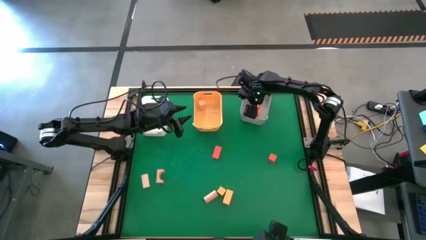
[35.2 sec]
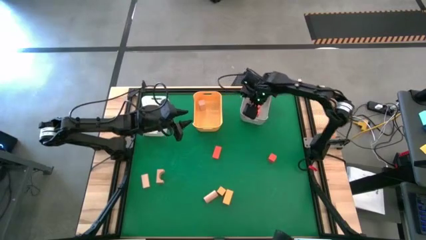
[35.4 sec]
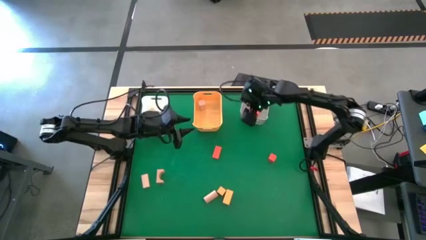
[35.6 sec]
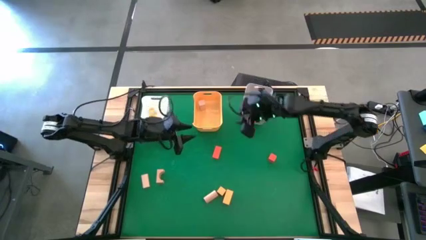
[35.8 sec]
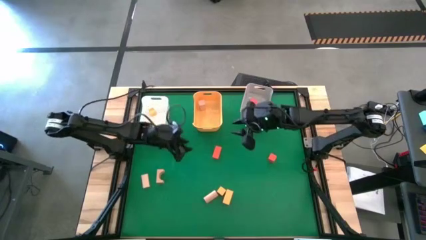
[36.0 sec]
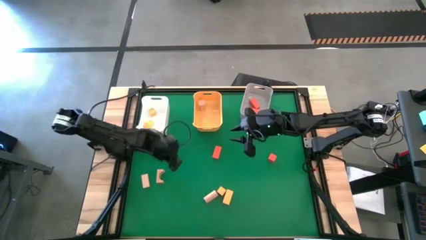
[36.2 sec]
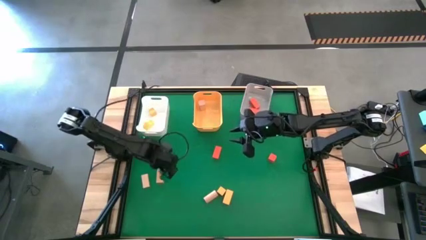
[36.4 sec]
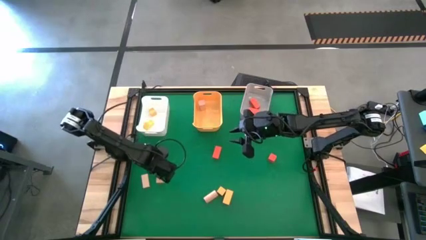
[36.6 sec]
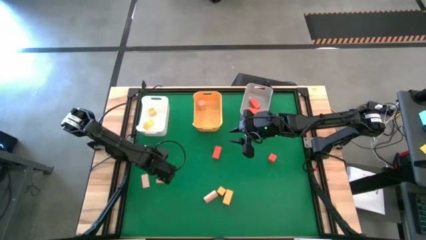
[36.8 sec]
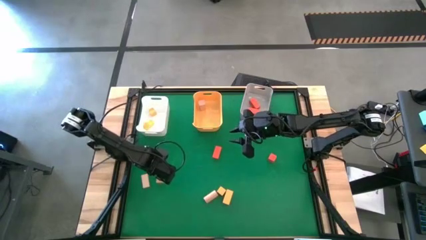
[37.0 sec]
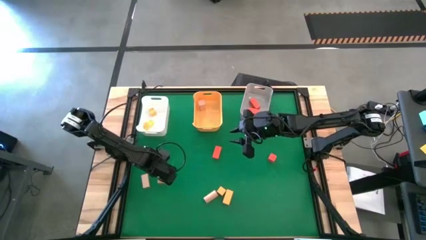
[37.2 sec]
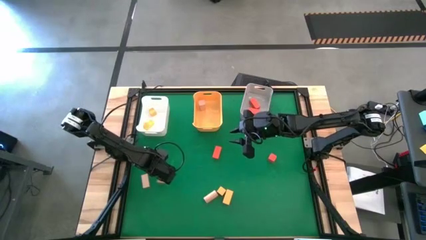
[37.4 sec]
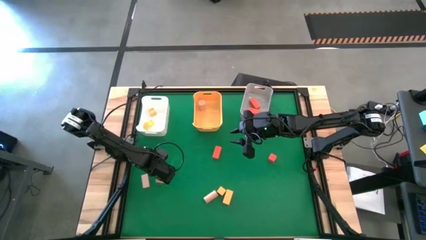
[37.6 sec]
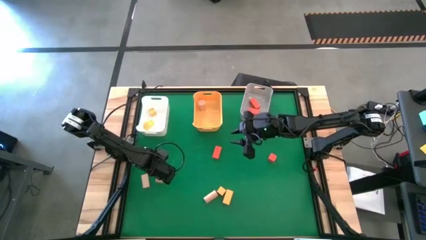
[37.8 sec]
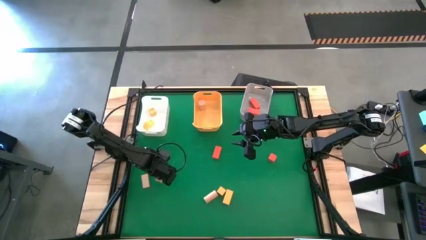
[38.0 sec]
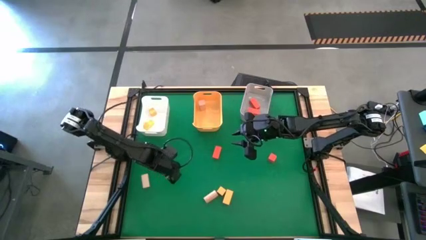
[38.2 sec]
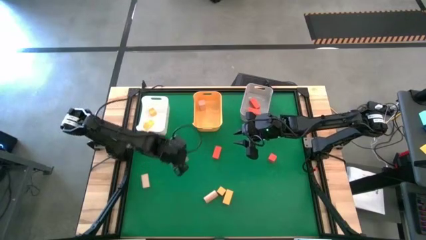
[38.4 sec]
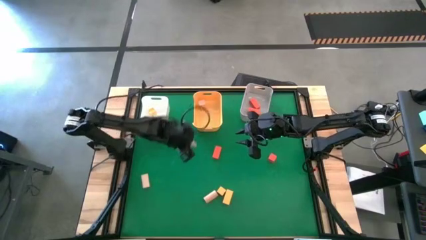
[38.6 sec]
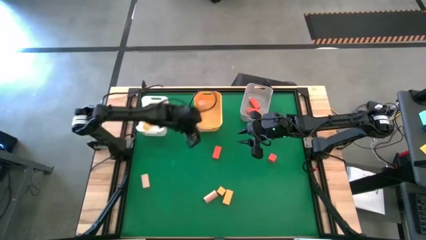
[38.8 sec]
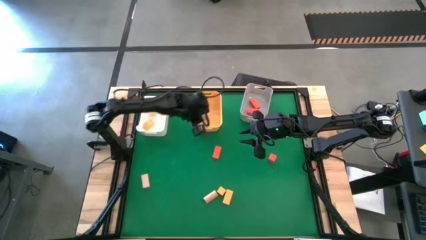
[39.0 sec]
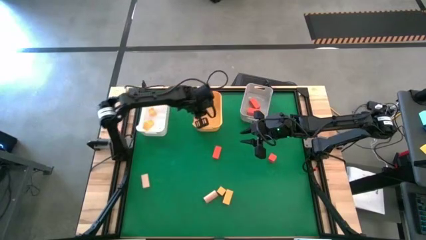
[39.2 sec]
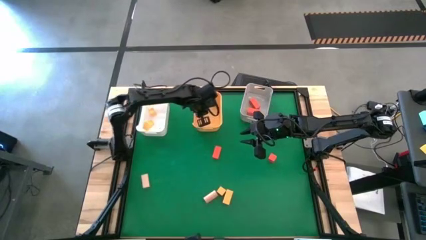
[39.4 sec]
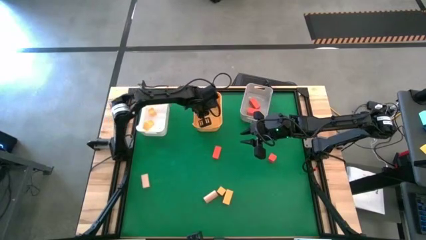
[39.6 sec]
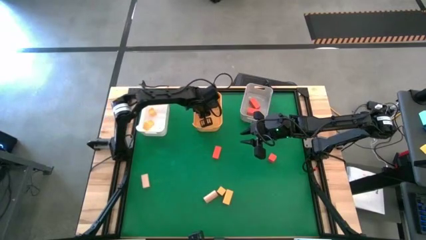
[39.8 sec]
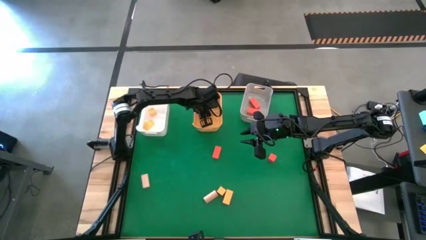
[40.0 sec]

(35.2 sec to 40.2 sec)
Task: Sort & place blocks by color
Put the brown block into the yellow bin

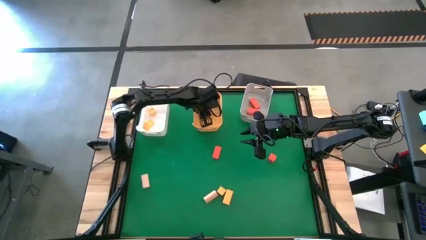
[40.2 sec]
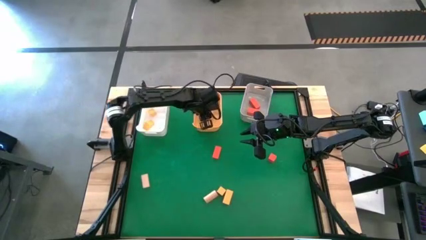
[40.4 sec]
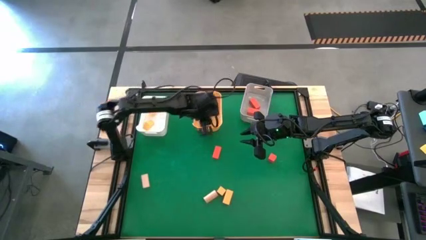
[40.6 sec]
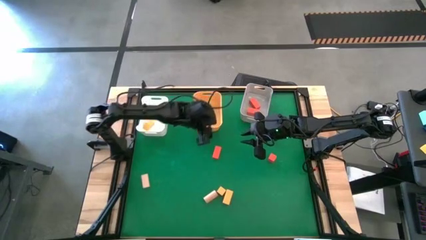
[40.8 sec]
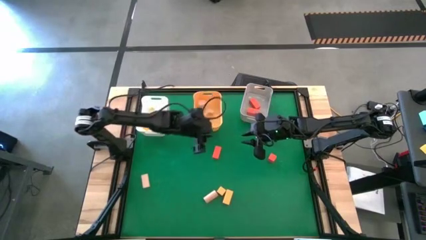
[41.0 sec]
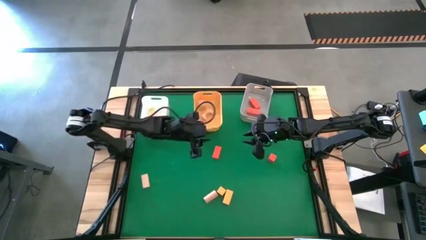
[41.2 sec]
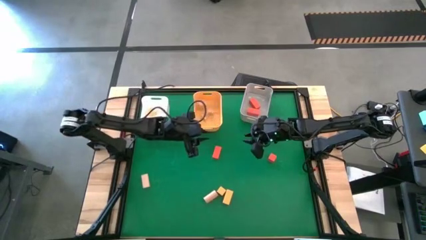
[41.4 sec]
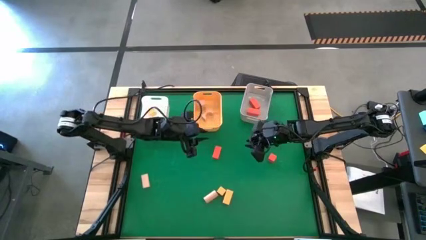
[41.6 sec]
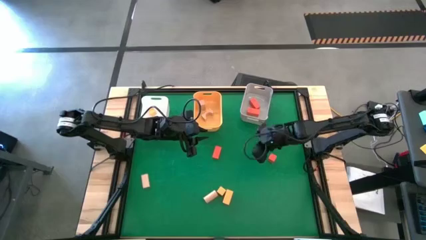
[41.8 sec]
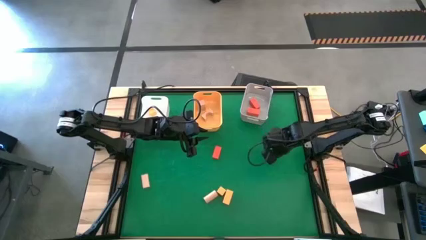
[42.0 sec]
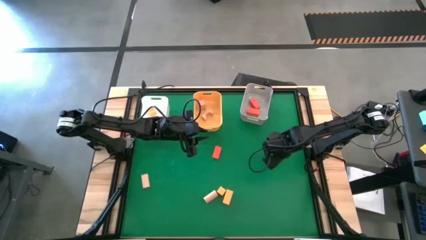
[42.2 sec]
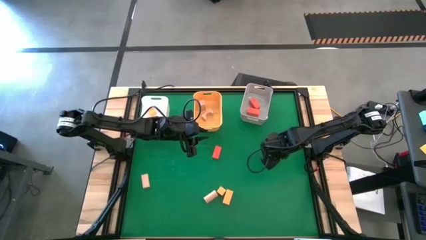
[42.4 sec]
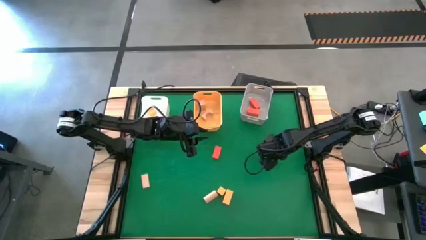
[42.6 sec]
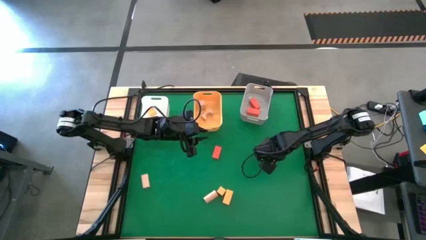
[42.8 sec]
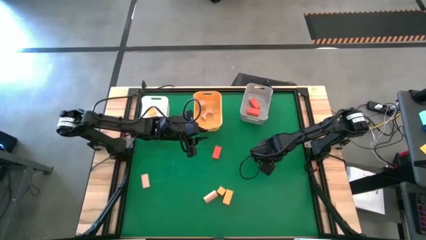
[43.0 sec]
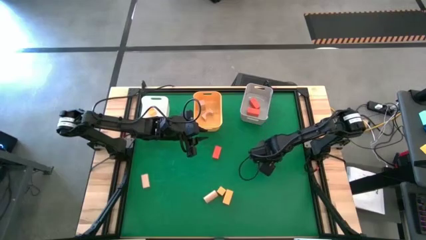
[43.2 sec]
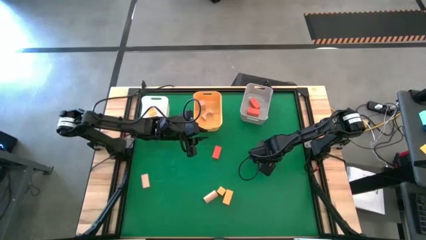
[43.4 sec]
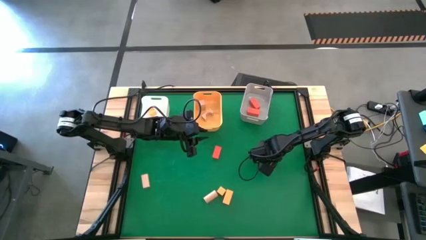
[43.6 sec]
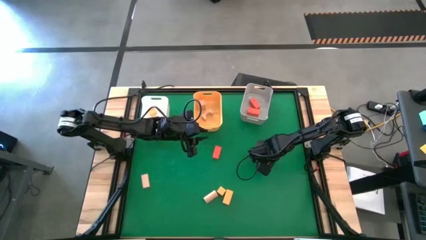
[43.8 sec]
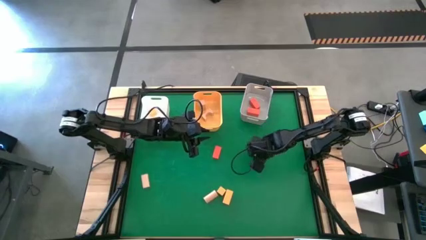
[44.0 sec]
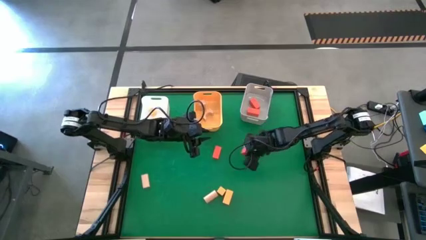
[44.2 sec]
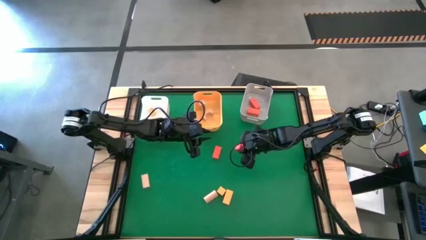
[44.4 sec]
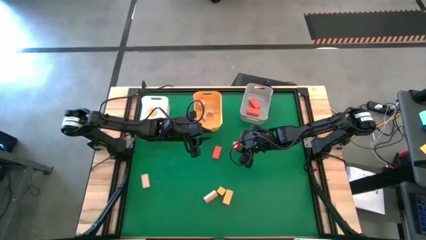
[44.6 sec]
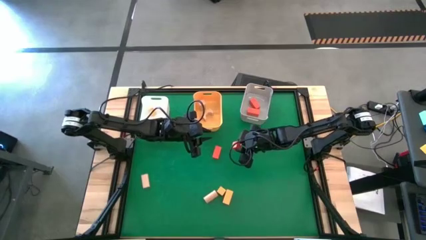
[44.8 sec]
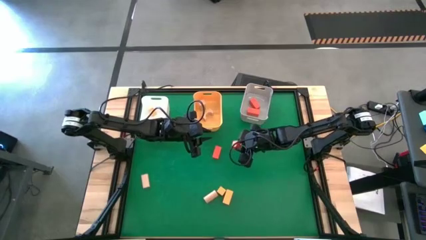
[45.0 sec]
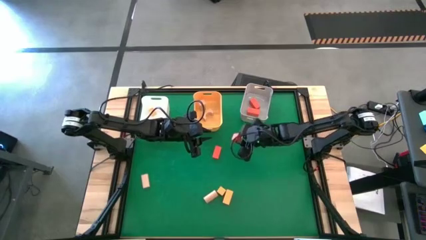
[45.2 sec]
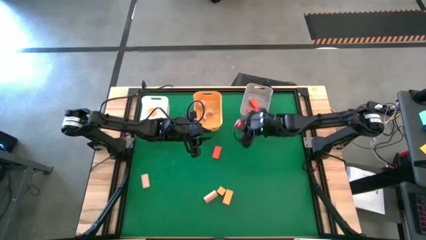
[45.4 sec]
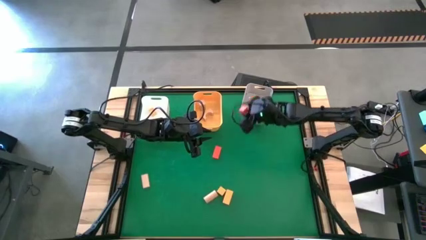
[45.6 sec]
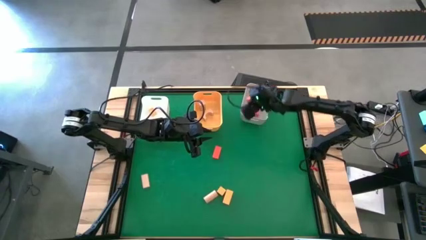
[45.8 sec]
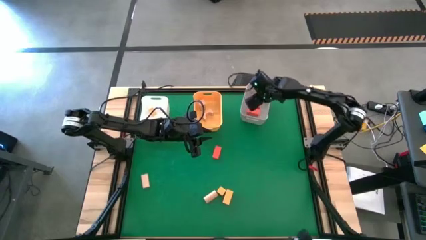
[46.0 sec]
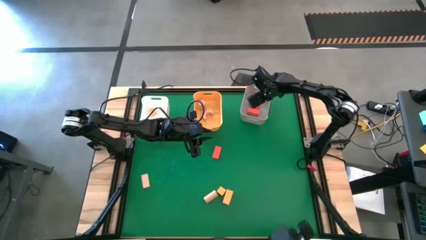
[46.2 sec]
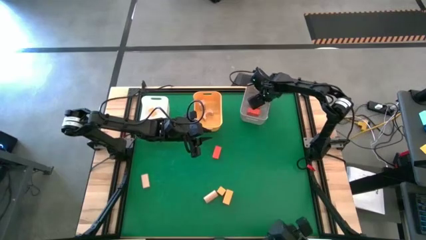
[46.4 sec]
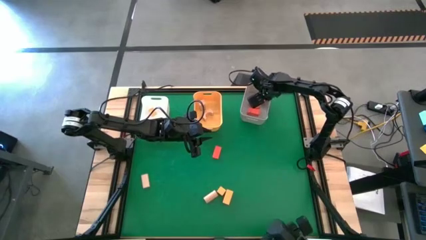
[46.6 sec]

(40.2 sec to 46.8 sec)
Put the orange block into the light gray bin

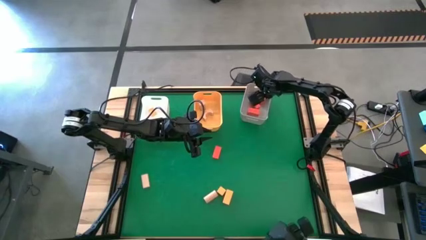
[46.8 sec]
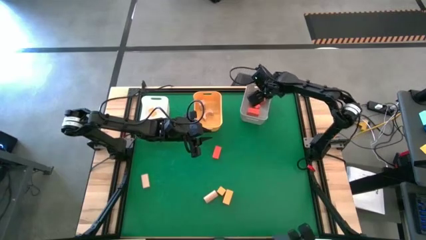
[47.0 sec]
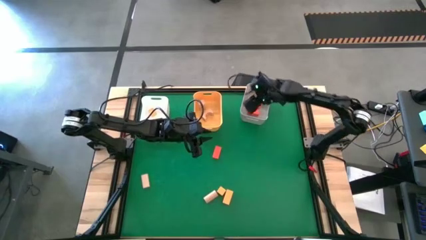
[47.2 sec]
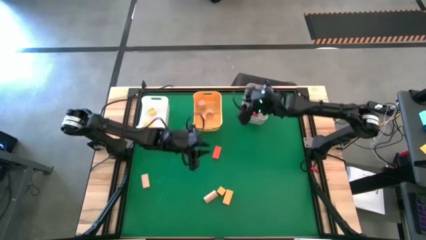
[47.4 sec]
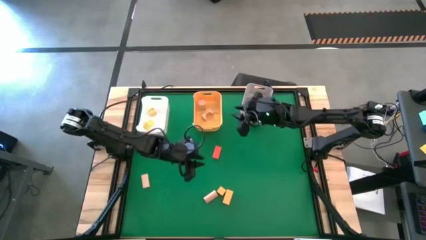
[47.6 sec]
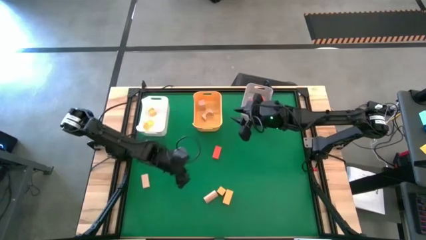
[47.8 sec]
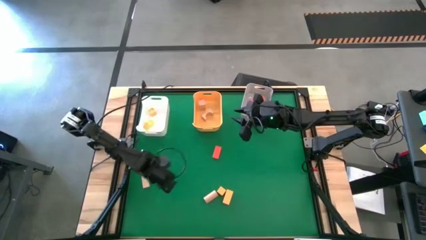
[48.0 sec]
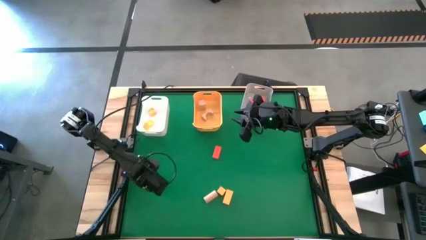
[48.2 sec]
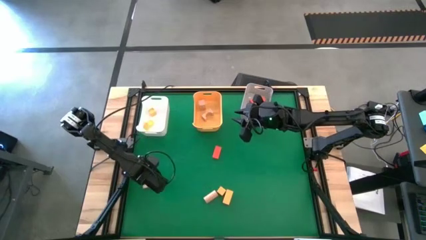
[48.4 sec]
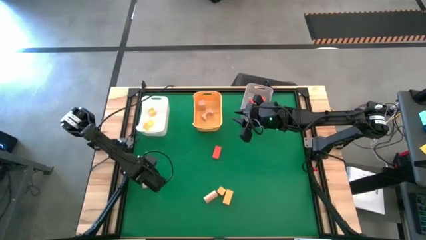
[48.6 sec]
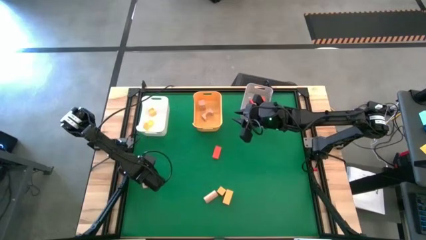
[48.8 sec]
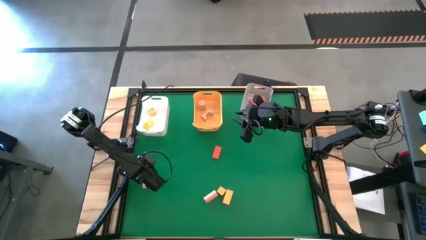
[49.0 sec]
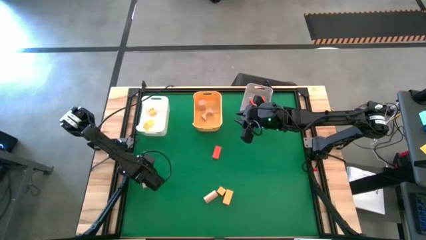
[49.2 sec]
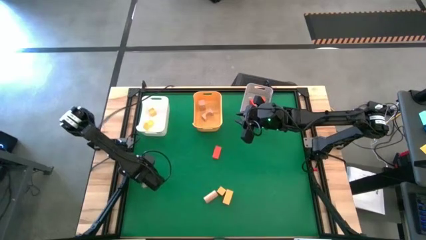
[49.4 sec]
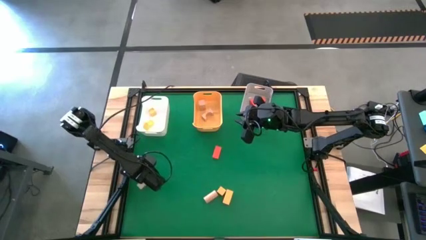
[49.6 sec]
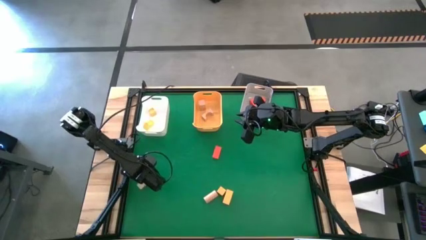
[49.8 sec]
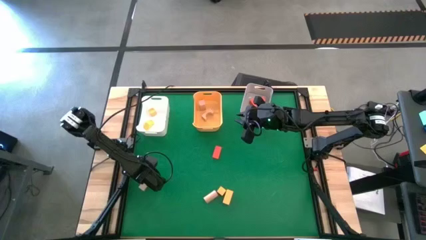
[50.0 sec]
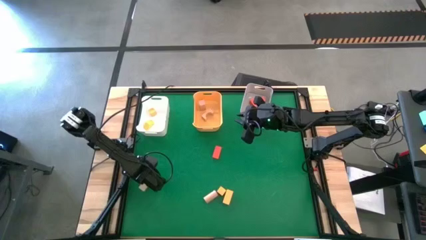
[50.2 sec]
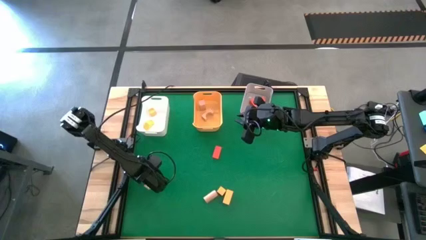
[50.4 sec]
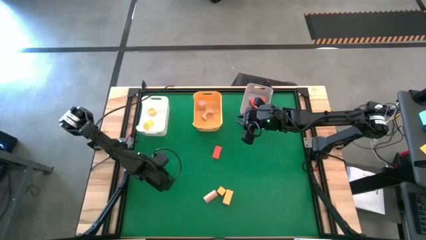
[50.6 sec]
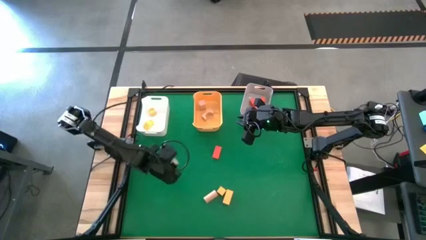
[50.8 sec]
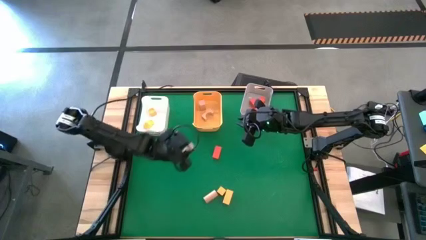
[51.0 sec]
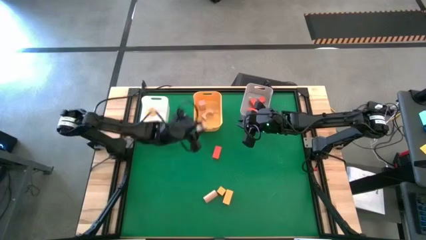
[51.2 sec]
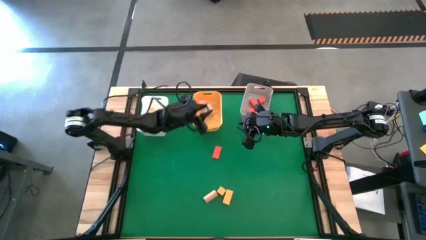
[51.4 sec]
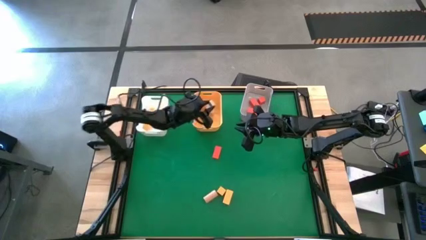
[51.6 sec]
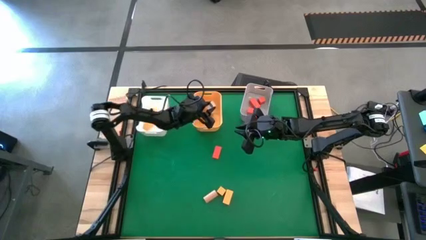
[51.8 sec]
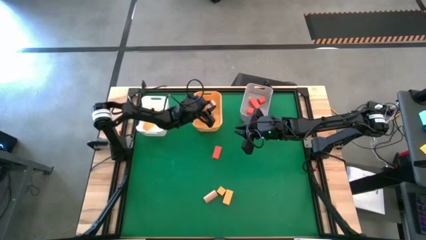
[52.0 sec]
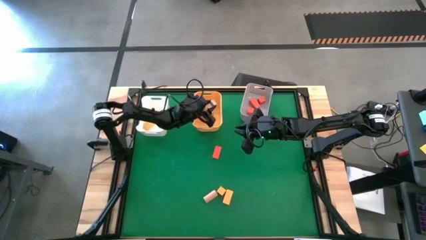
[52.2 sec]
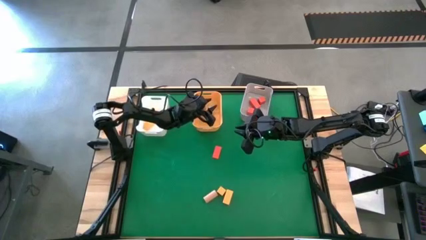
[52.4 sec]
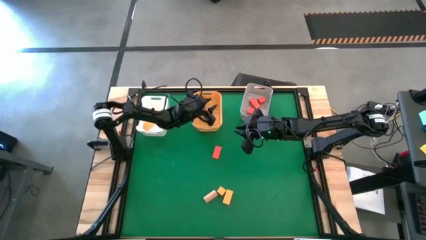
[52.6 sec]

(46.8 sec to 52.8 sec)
Put the brown block into the yellow bin
